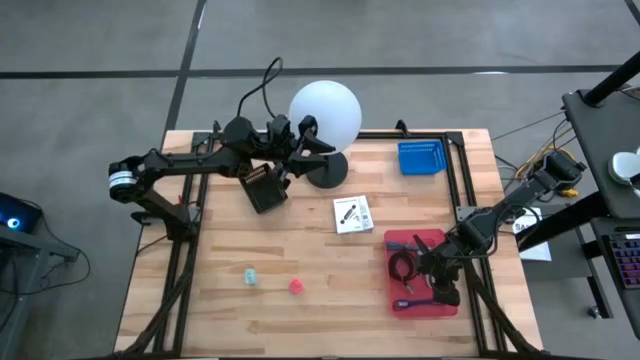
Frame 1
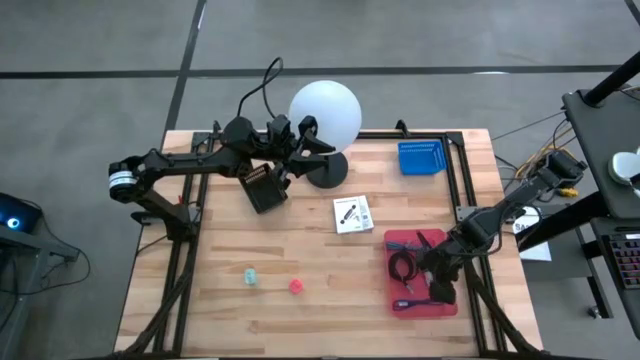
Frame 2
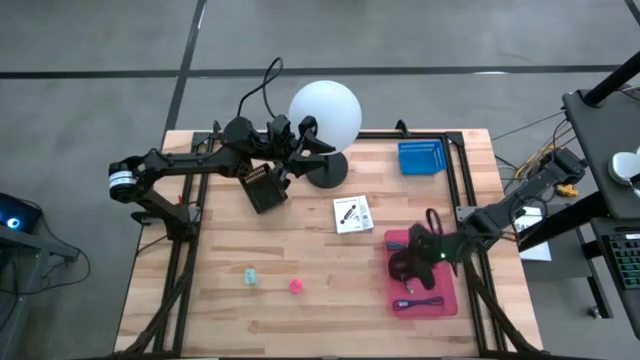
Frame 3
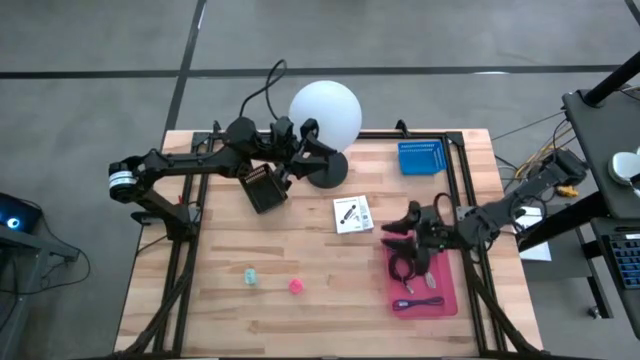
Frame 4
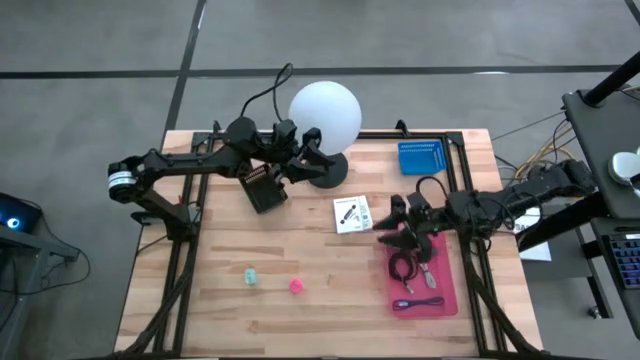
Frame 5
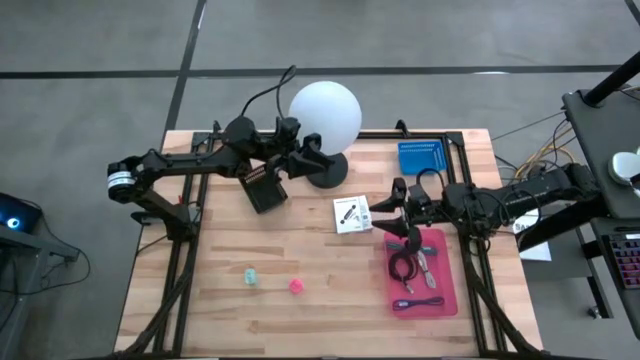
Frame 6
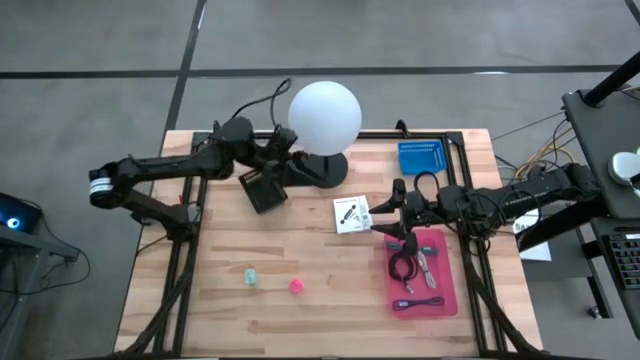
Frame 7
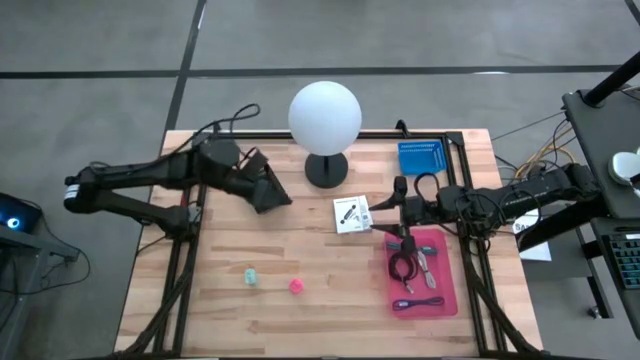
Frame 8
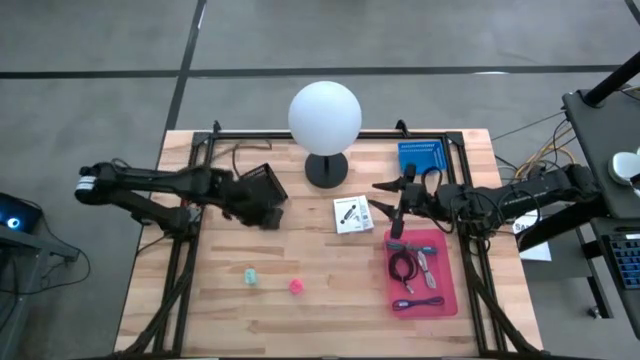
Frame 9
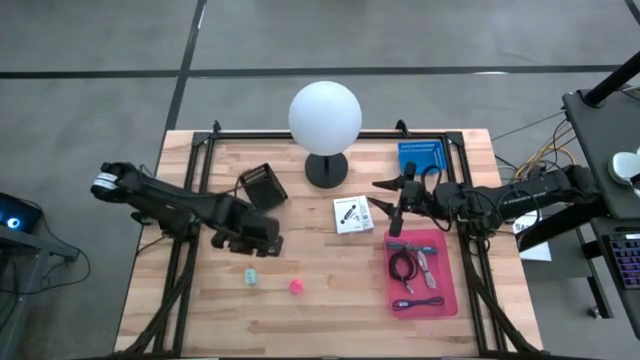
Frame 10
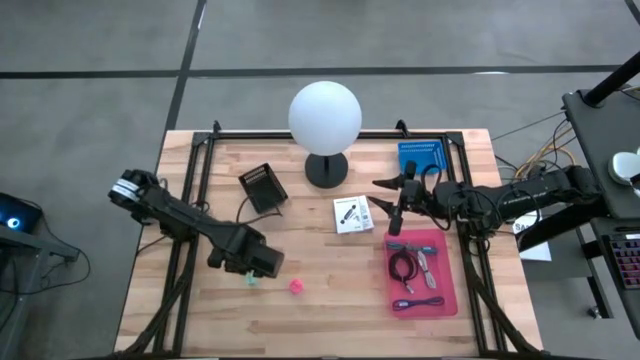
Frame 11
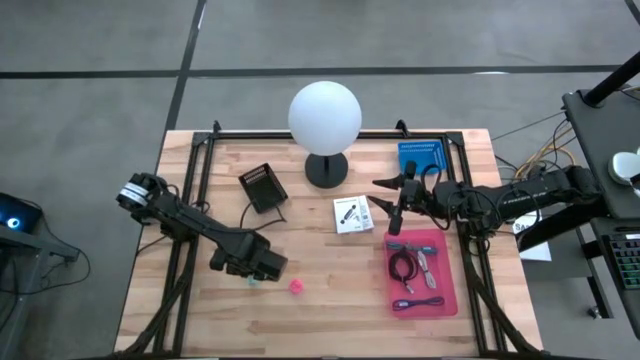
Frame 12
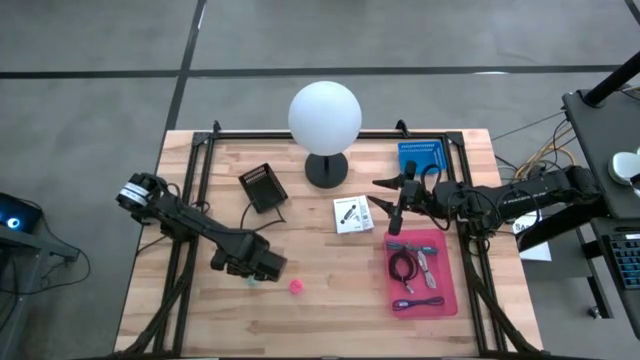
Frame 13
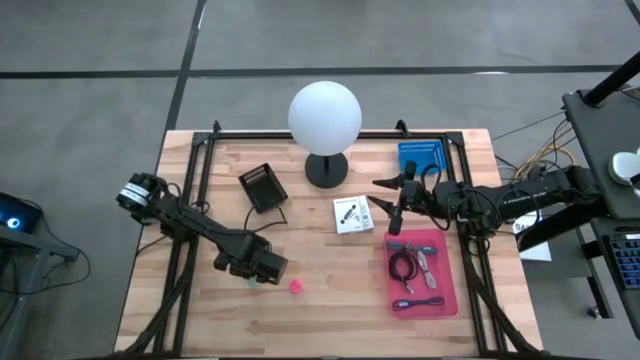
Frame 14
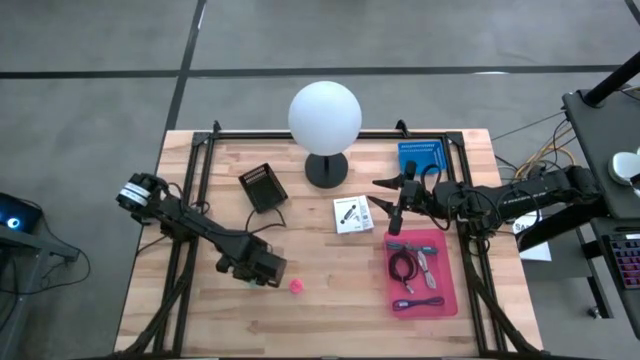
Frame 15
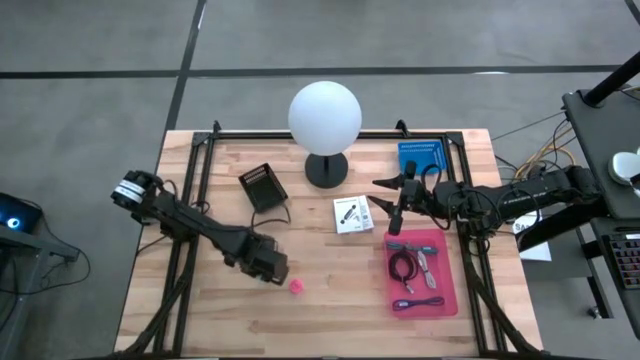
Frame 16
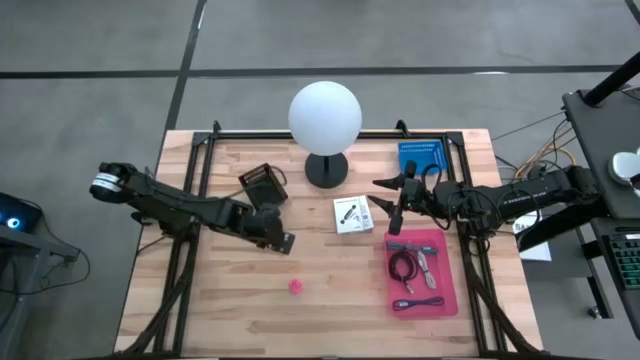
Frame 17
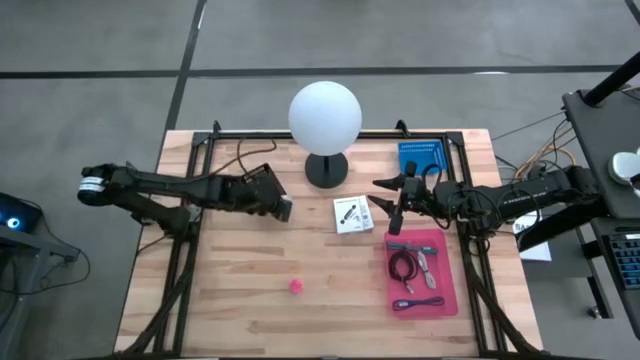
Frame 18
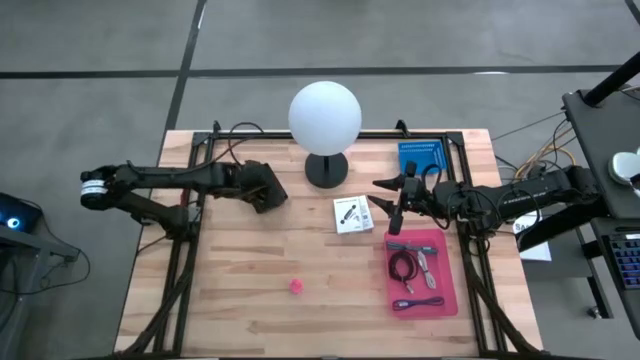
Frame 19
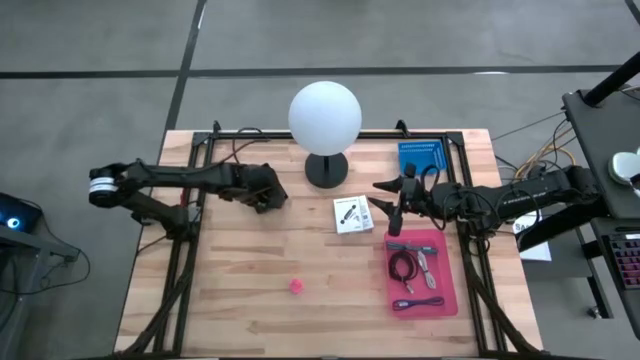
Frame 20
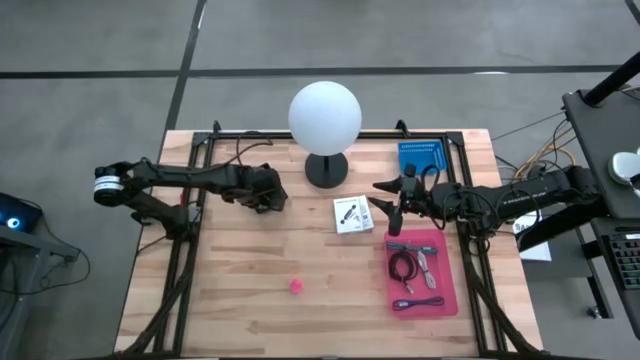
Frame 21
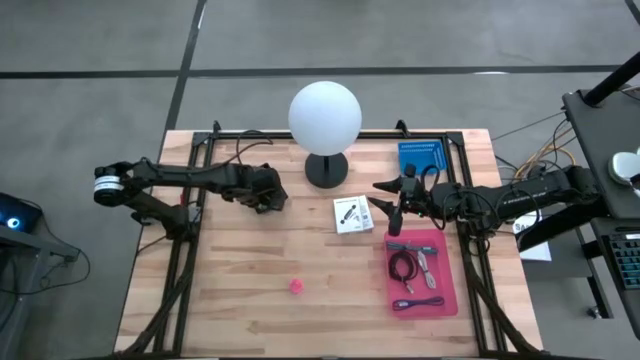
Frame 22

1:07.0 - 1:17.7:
Task: Pick and place items into bin
Put the blue charger cable adapter into the black bin

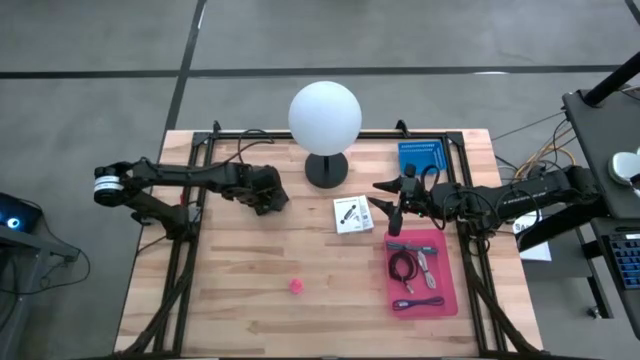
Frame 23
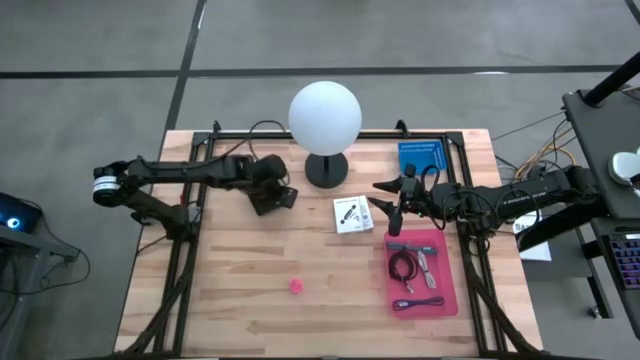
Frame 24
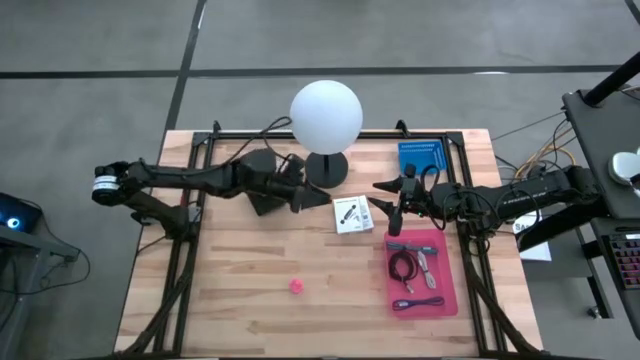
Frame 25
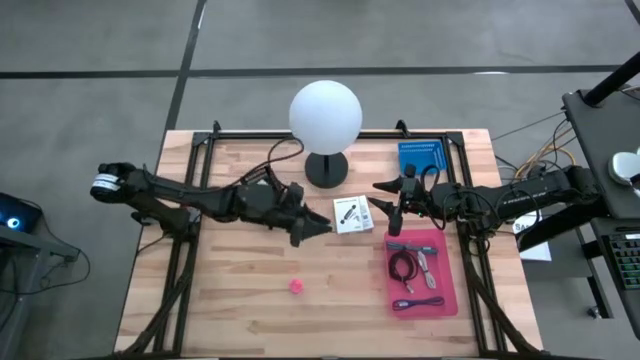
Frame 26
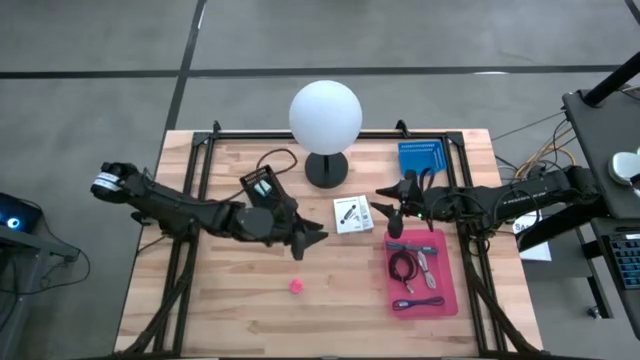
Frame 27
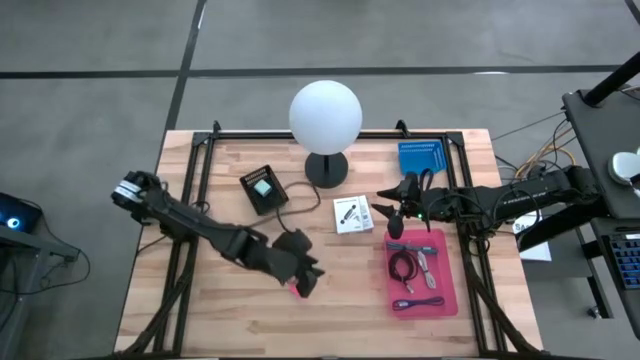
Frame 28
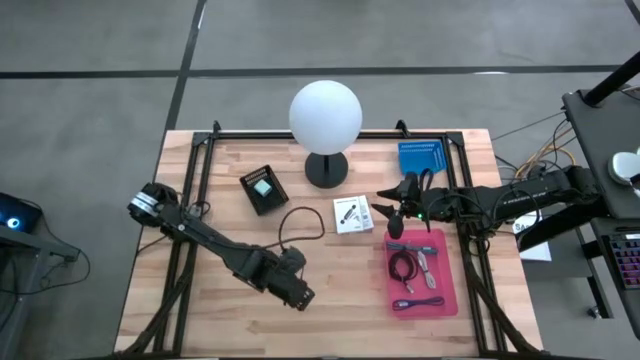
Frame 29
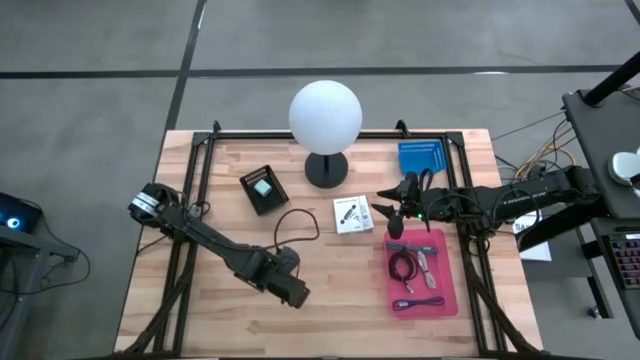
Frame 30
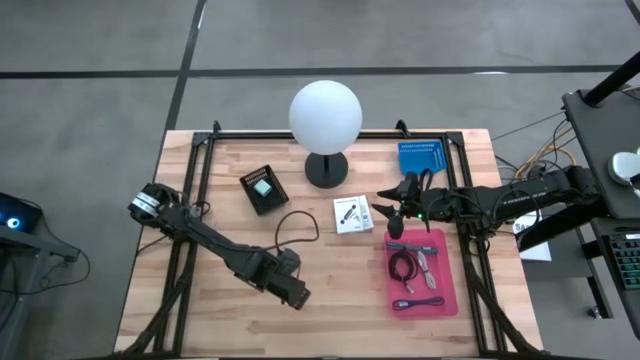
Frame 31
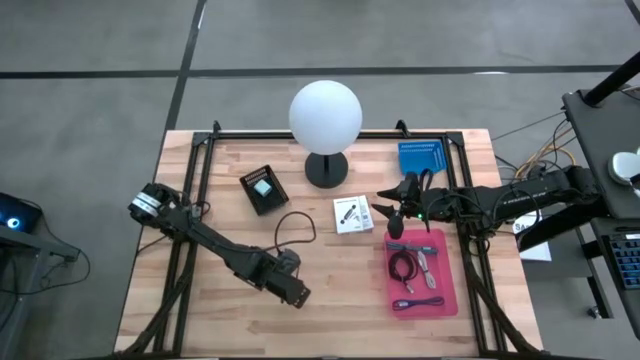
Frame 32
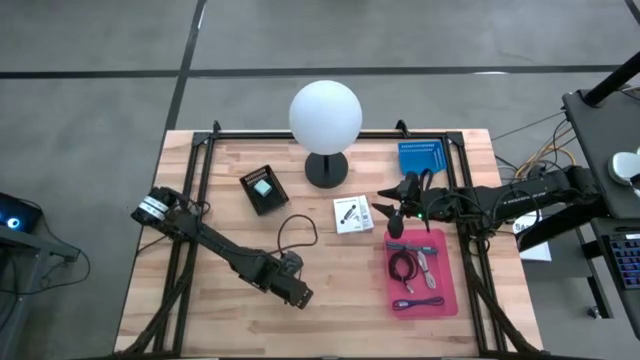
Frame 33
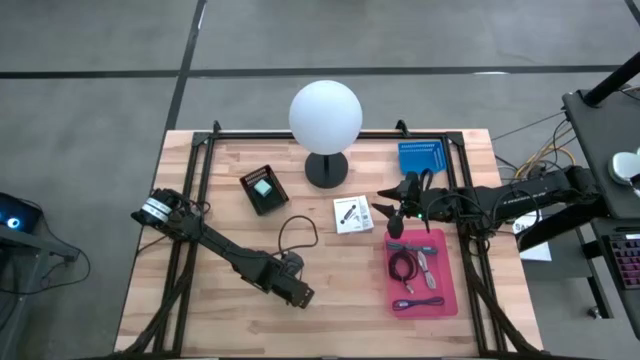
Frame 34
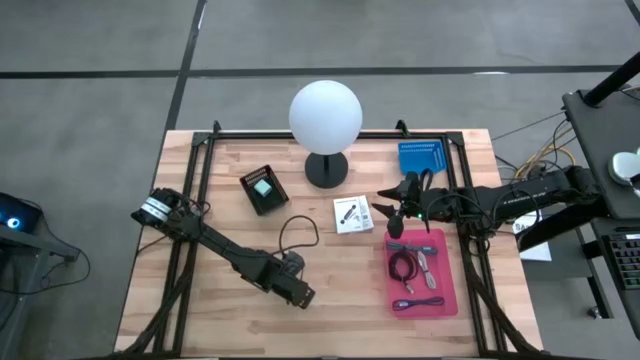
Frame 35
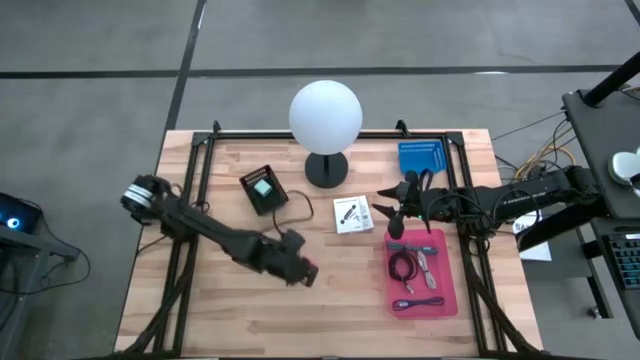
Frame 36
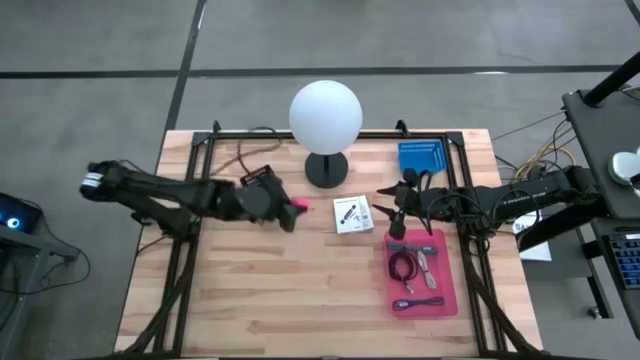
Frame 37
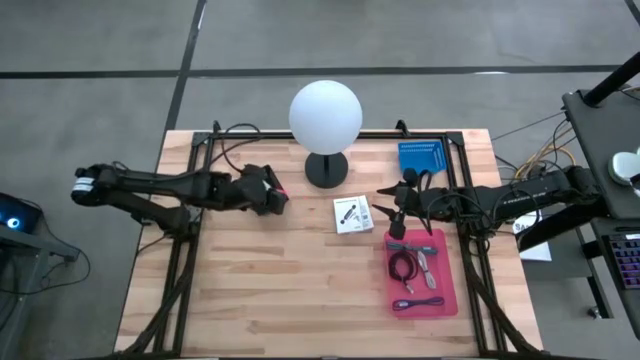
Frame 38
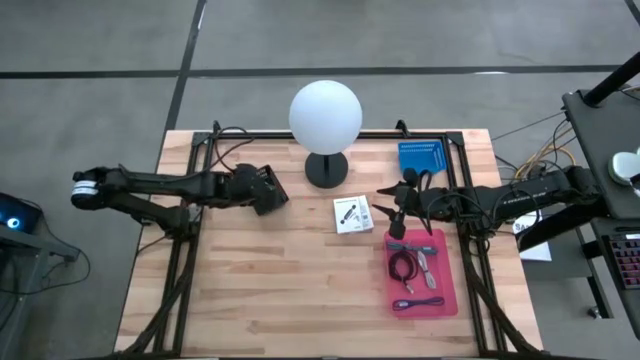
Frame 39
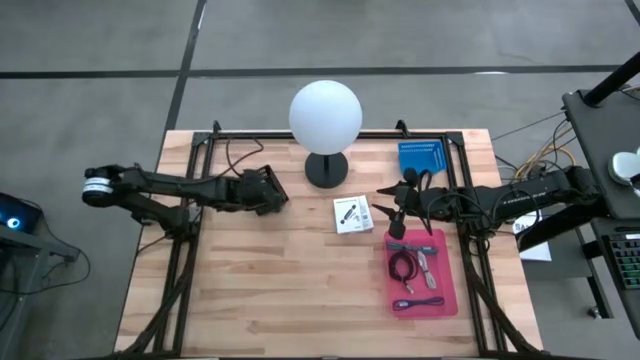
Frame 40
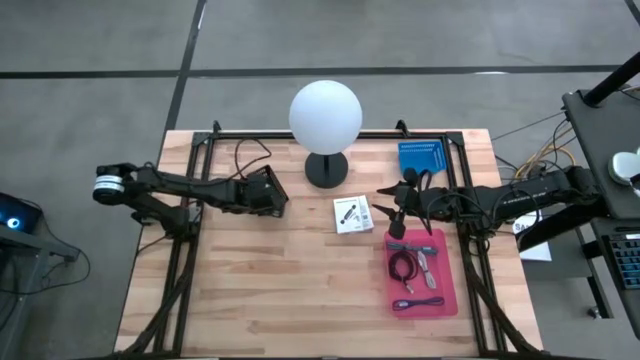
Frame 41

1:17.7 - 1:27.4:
Put the pink charger cable adapter into the black bin
